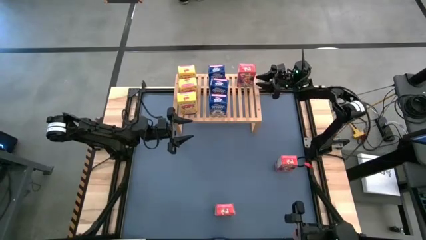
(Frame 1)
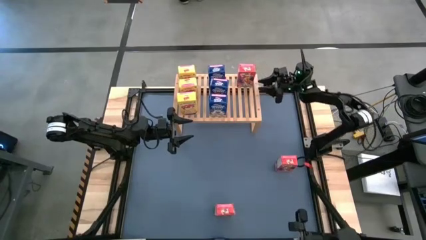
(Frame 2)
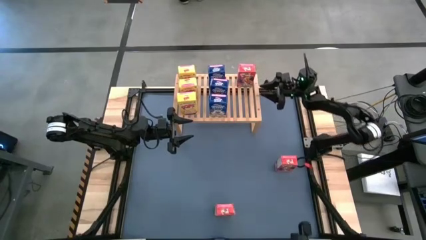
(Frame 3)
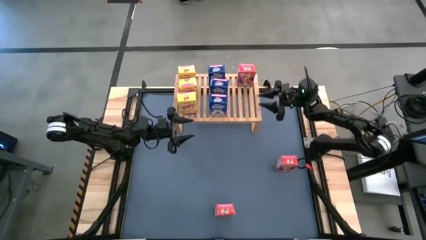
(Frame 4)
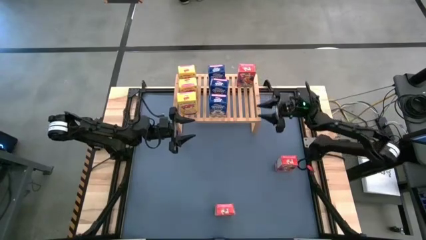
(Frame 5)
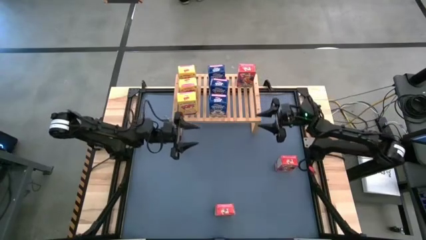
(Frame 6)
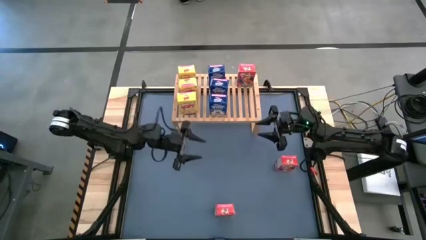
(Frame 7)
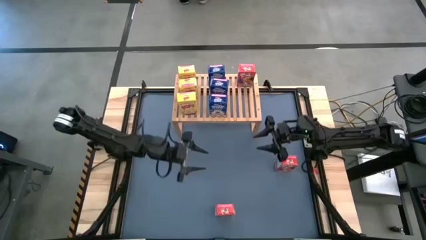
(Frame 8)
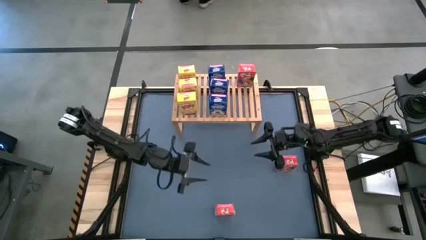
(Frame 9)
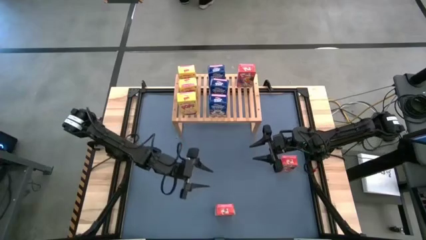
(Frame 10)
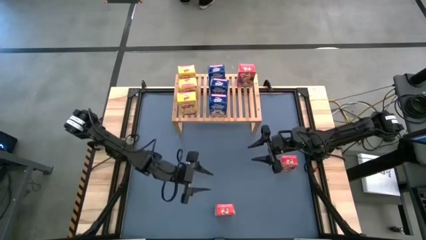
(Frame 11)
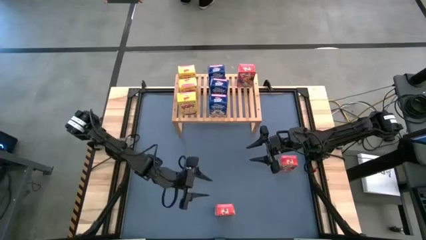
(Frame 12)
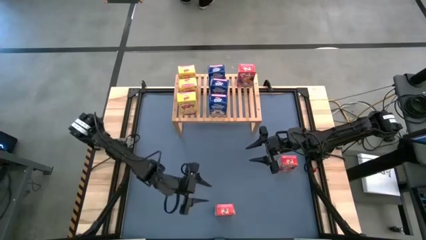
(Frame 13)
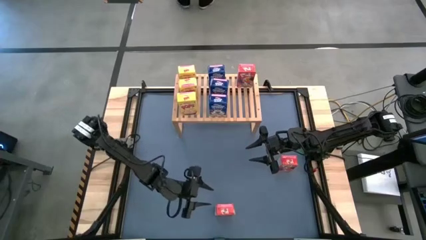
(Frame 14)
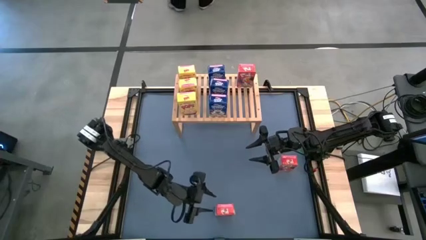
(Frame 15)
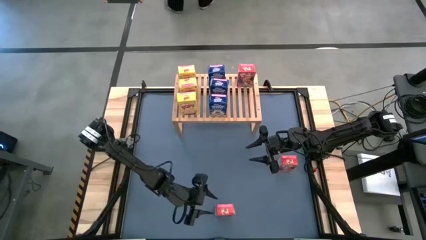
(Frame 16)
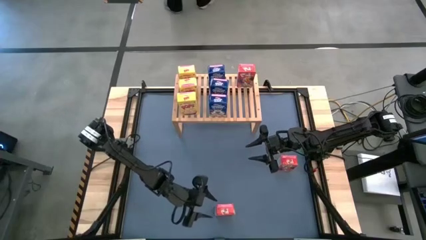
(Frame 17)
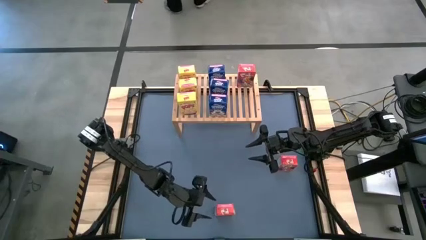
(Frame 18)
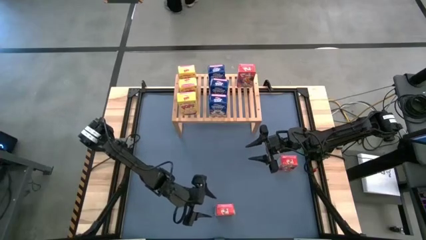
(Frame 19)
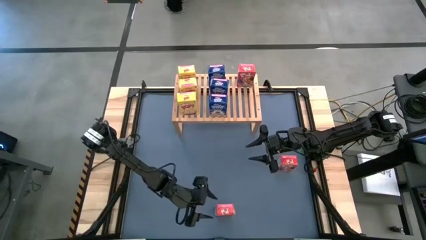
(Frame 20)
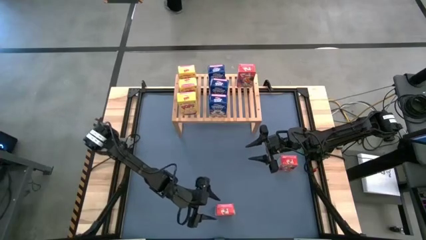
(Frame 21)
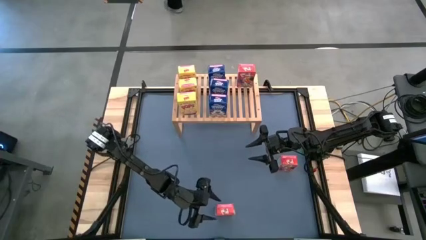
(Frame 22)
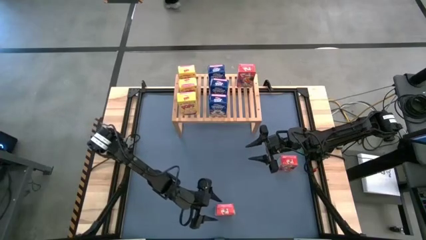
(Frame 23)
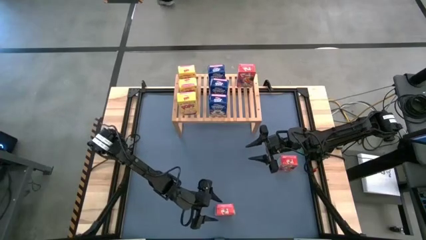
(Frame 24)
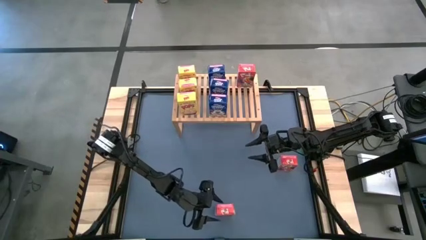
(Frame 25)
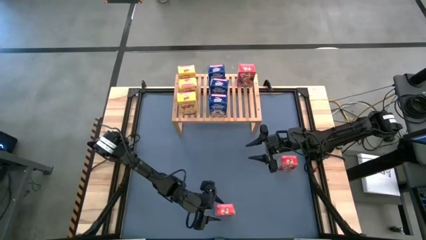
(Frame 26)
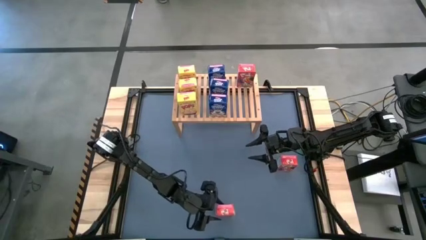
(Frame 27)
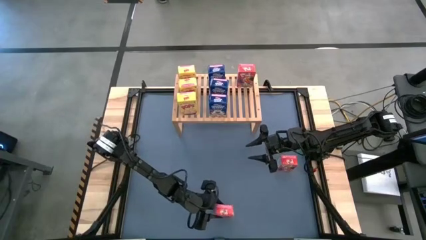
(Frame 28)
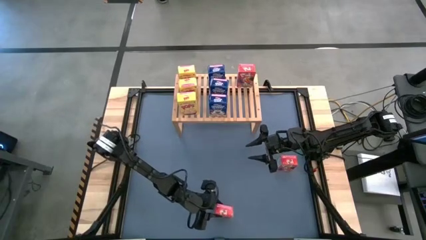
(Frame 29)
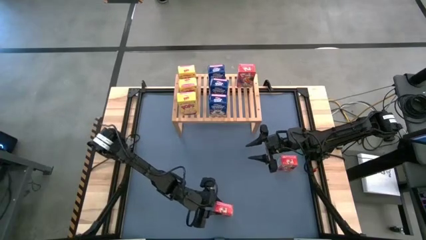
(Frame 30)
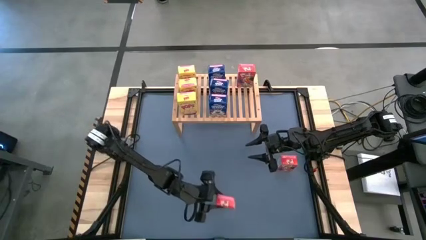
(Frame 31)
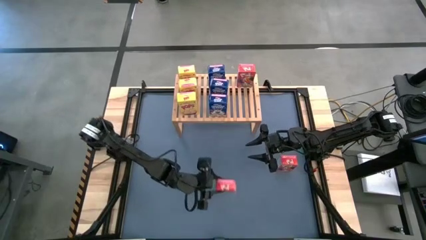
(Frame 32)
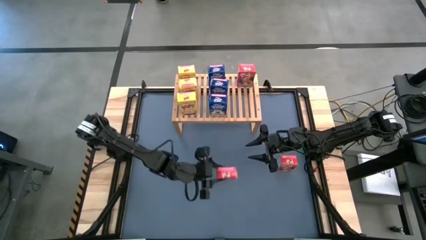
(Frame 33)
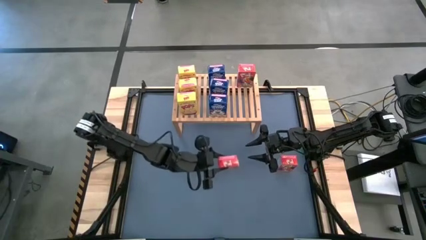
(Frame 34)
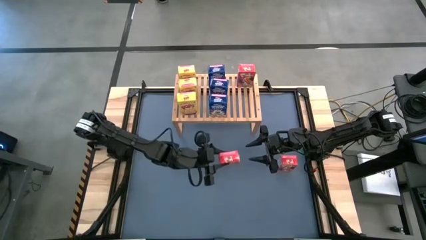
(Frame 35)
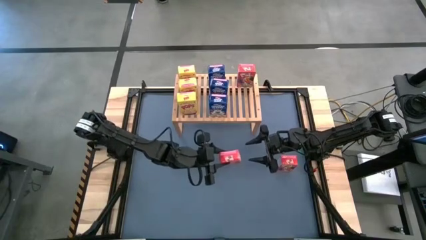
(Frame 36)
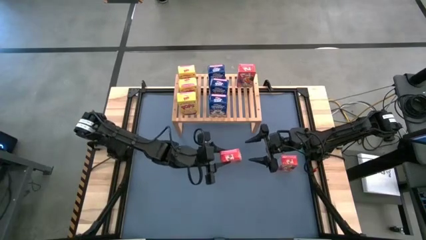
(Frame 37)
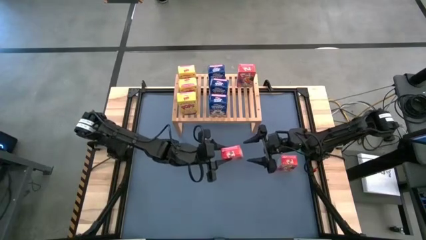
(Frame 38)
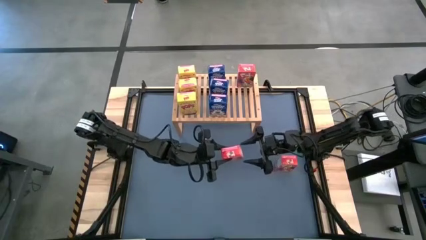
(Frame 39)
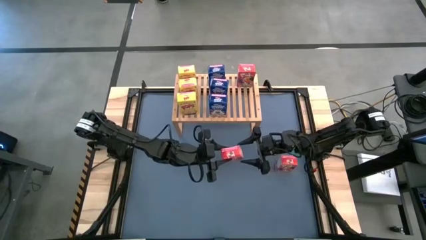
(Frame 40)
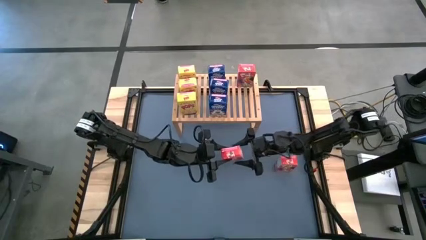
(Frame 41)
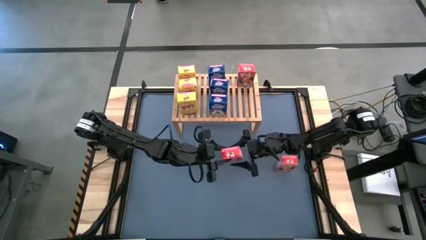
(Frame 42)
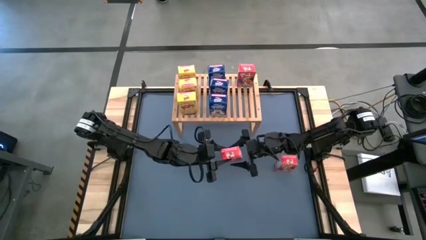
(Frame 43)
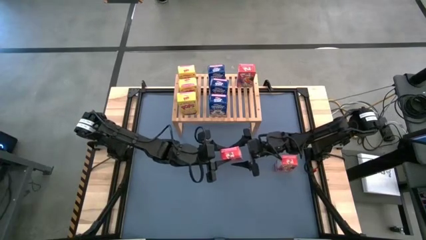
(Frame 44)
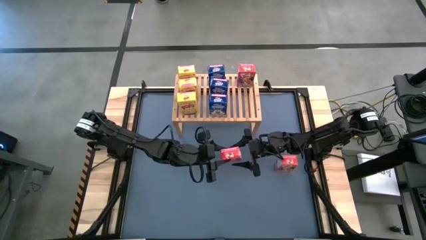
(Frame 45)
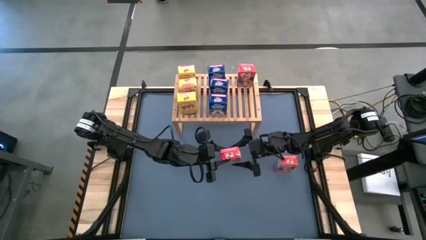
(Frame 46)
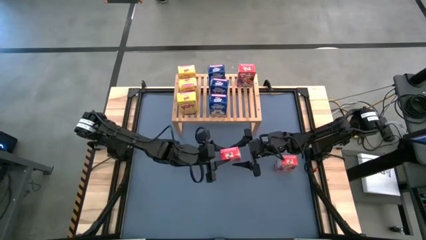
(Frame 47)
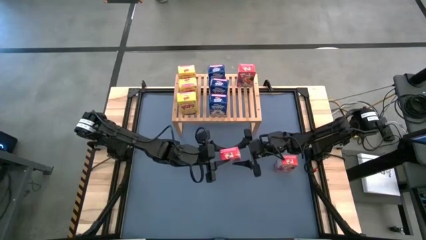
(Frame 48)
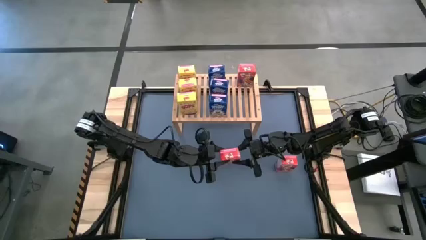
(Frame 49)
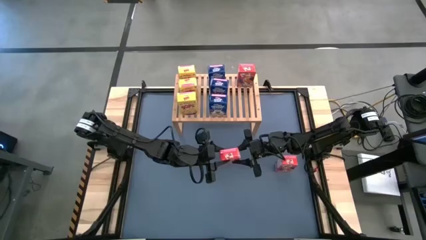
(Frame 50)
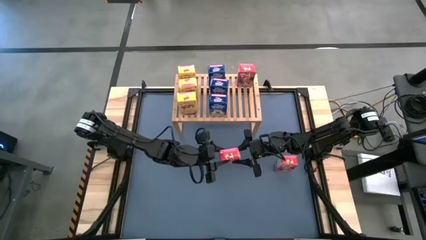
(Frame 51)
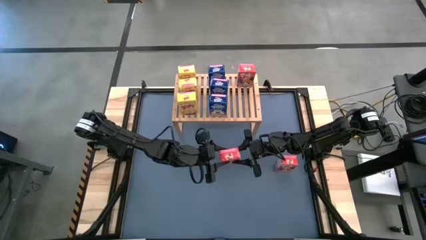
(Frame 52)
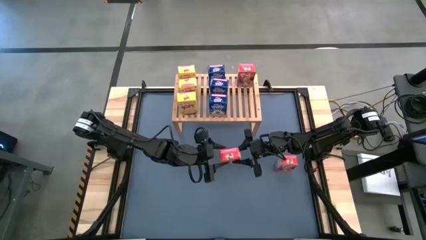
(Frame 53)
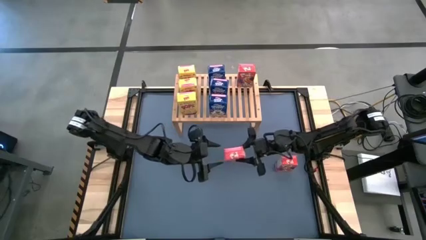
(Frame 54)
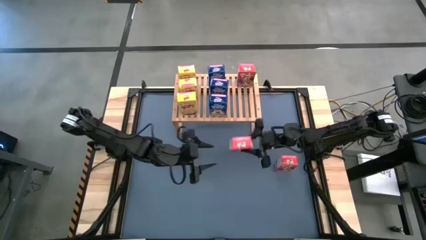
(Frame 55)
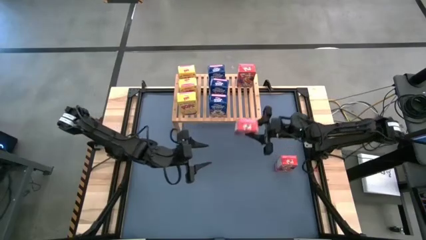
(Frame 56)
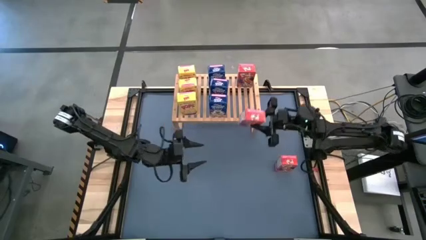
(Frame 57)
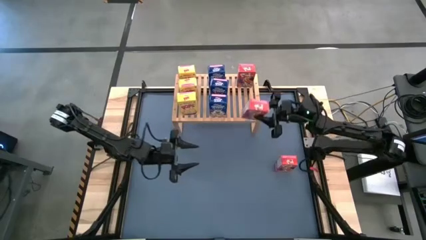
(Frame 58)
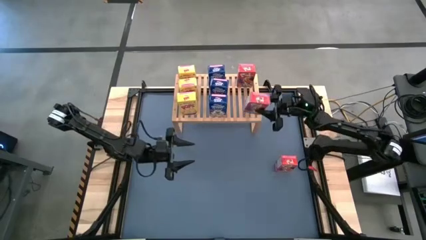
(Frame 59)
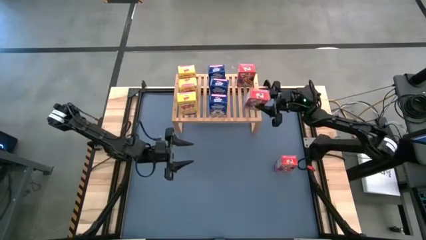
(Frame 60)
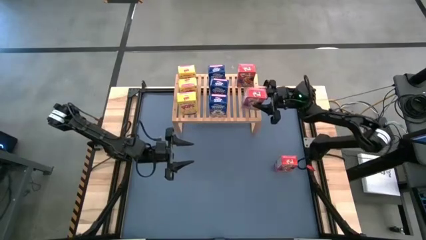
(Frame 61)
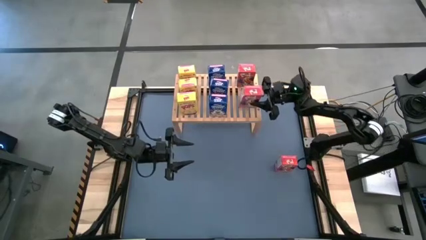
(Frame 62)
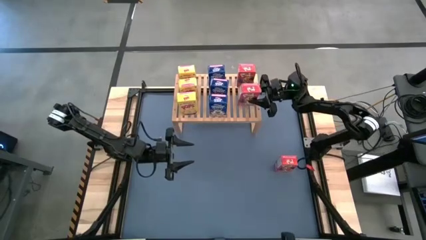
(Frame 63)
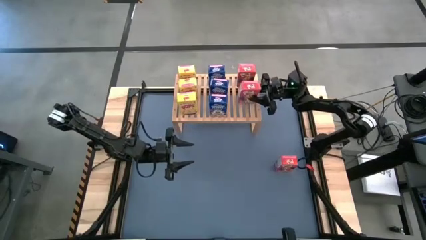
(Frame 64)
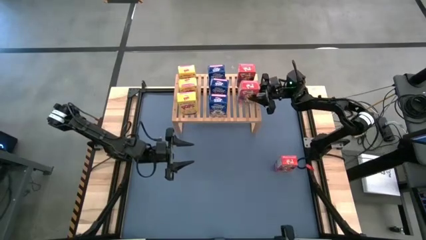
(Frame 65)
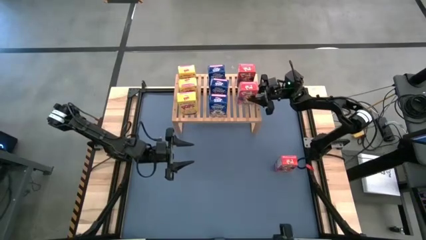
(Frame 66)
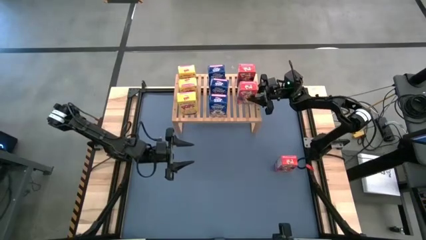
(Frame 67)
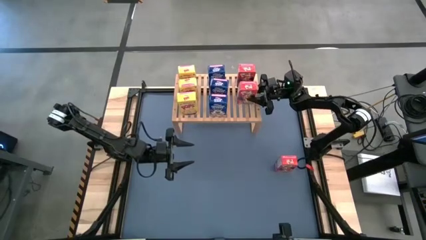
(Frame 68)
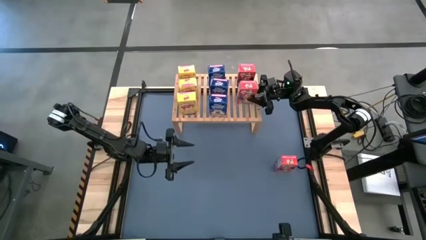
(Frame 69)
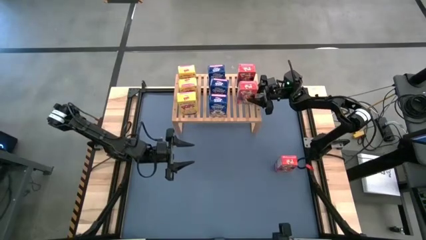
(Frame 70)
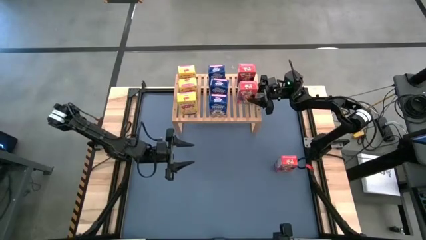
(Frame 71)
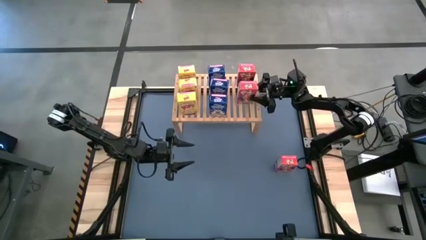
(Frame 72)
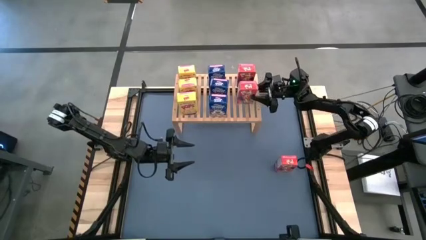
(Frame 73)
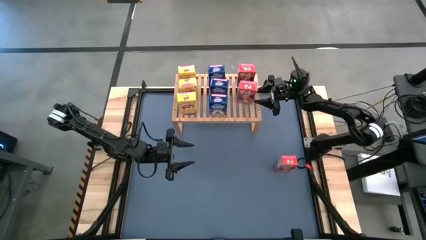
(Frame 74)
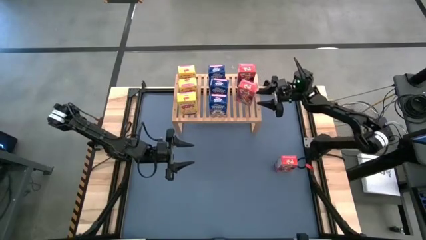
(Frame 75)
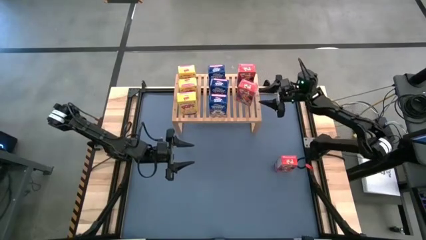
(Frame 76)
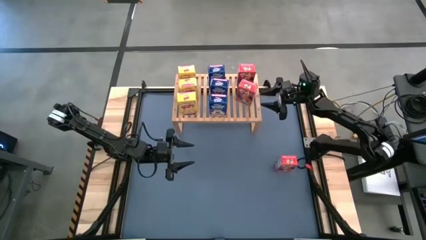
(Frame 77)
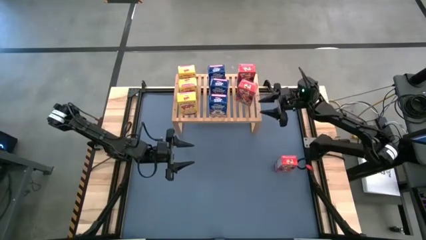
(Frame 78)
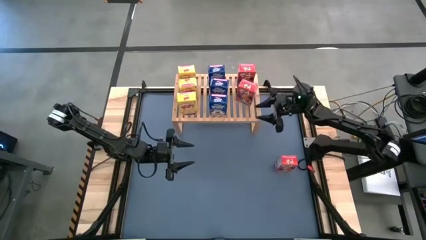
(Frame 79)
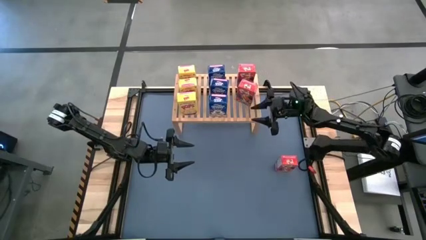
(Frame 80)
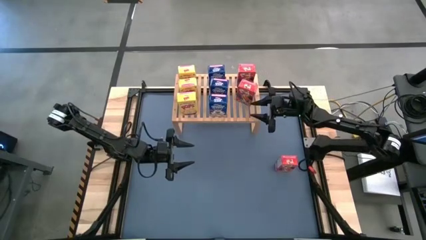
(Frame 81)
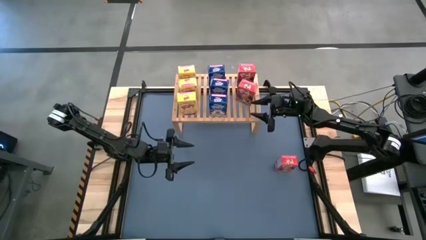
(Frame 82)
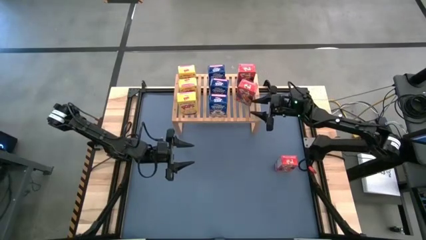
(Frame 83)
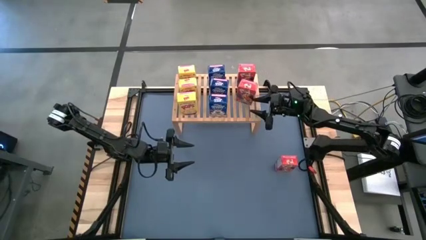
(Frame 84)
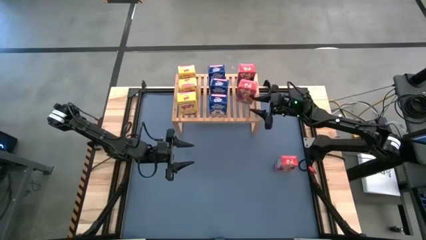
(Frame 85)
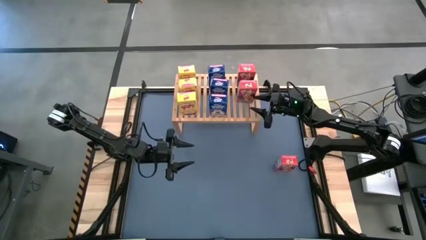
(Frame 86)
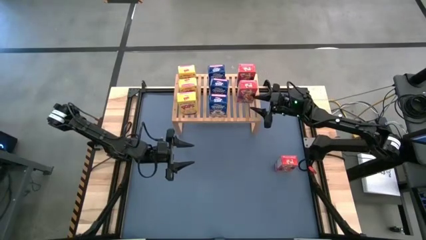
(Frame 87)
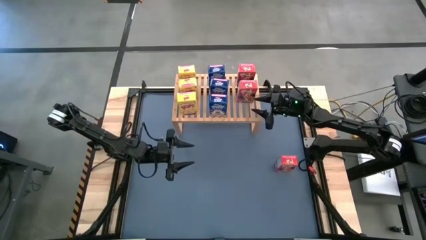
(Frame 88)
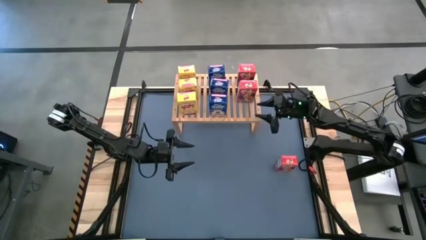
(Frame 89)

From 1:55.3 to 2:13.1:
Task: Stack cereal on shelf
Put the bottom red cereal box aligned with the other red cereal box on the shelf
